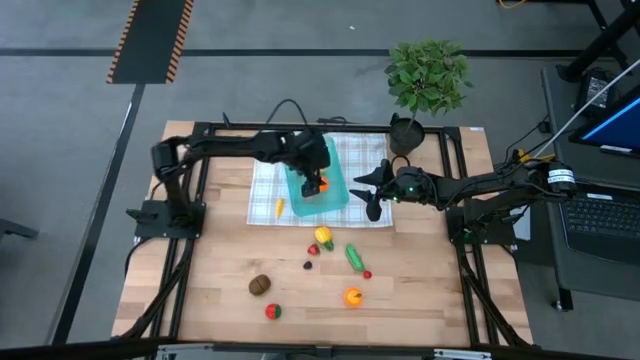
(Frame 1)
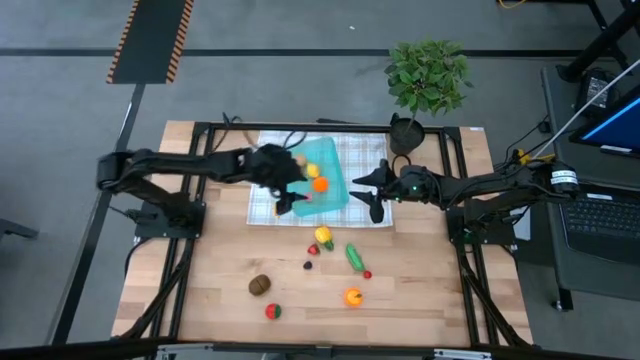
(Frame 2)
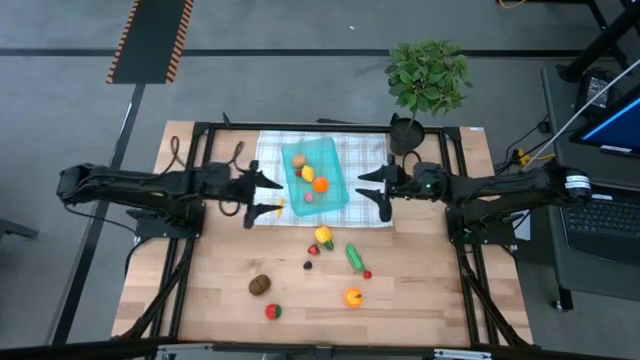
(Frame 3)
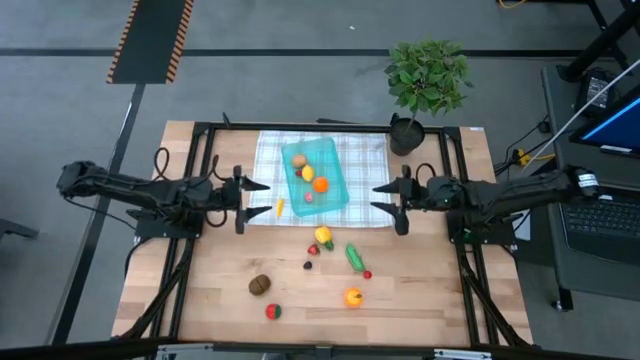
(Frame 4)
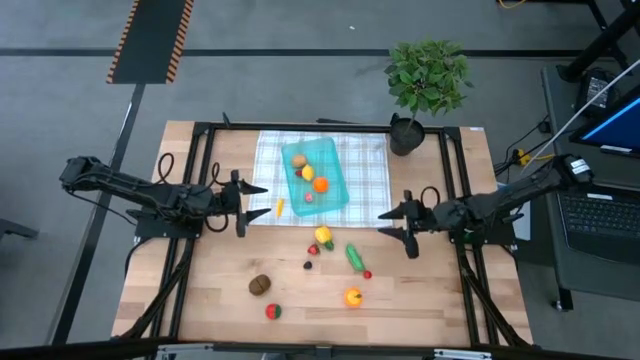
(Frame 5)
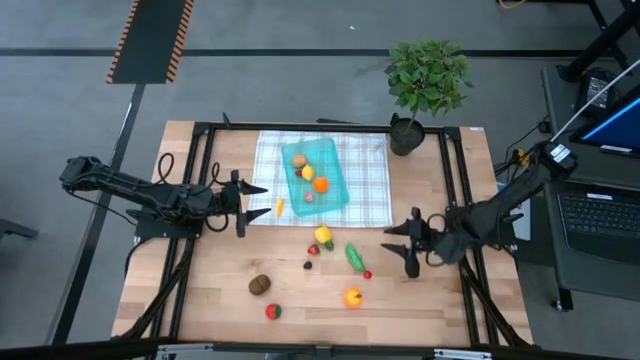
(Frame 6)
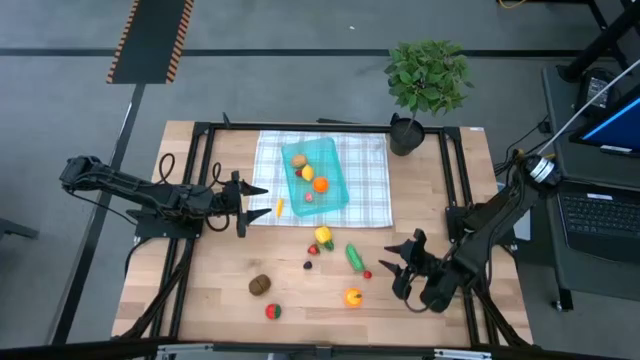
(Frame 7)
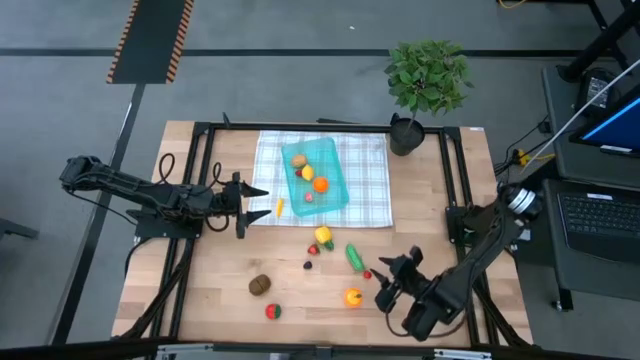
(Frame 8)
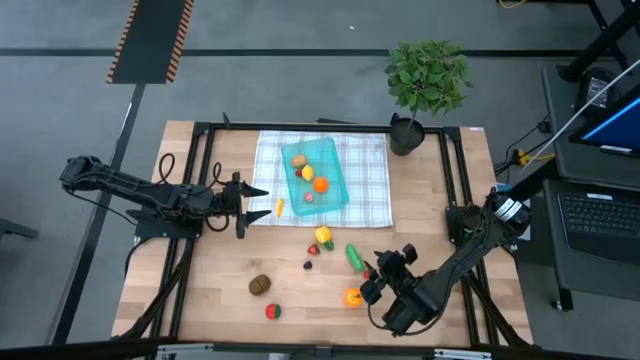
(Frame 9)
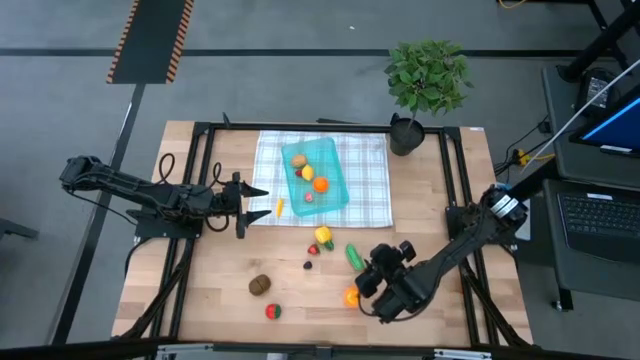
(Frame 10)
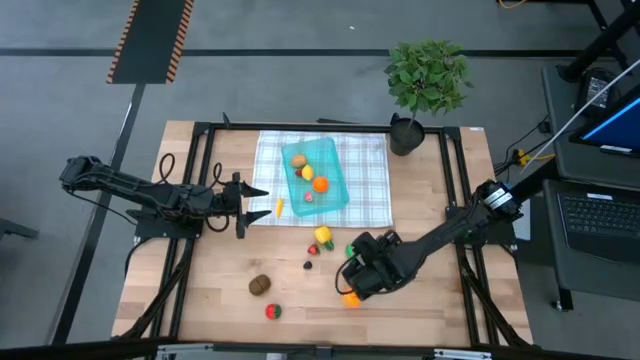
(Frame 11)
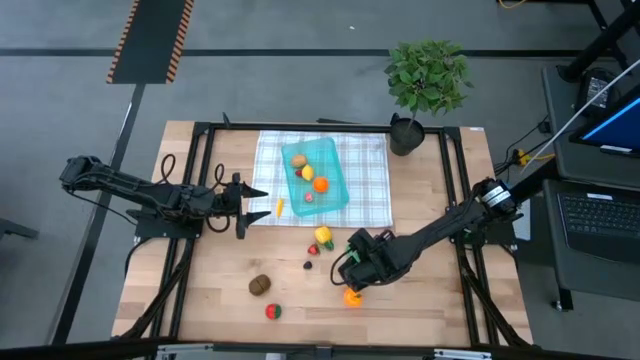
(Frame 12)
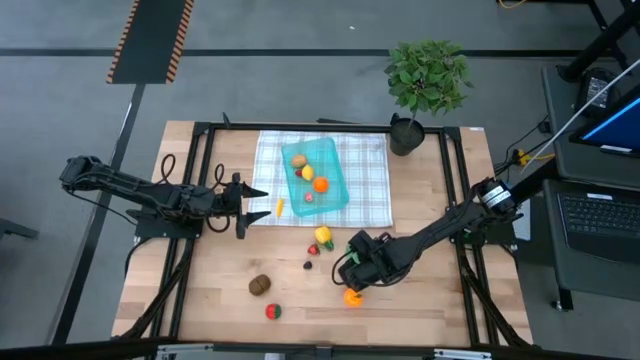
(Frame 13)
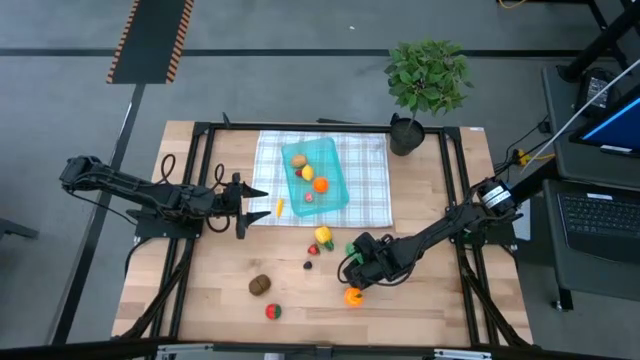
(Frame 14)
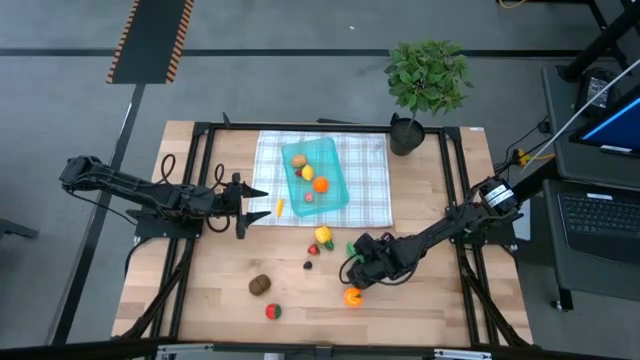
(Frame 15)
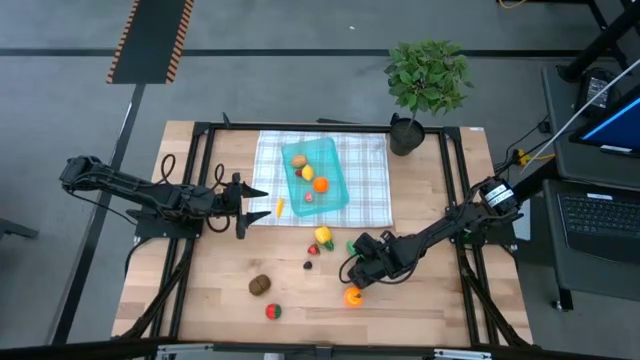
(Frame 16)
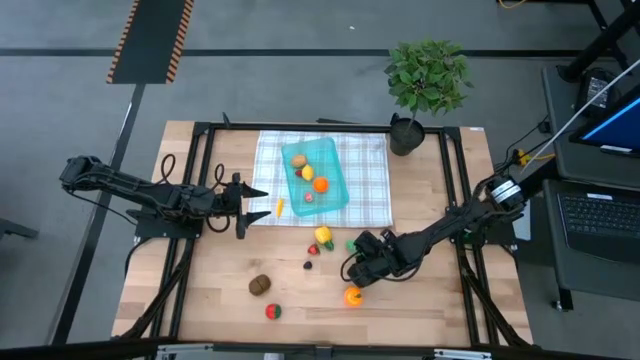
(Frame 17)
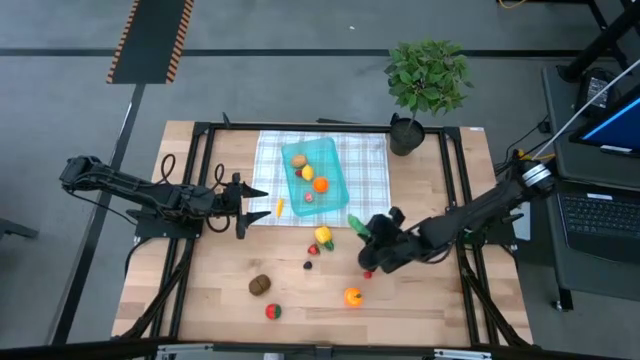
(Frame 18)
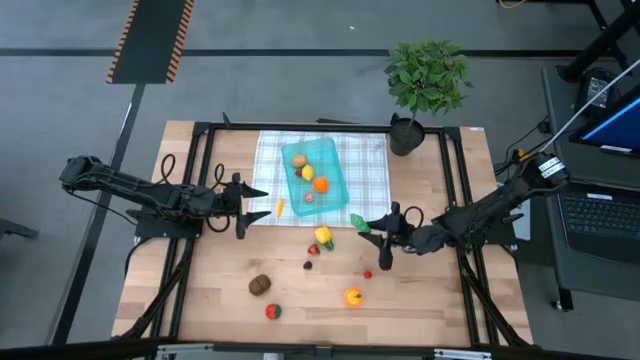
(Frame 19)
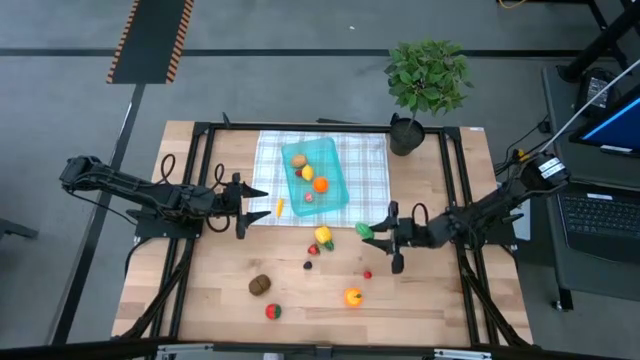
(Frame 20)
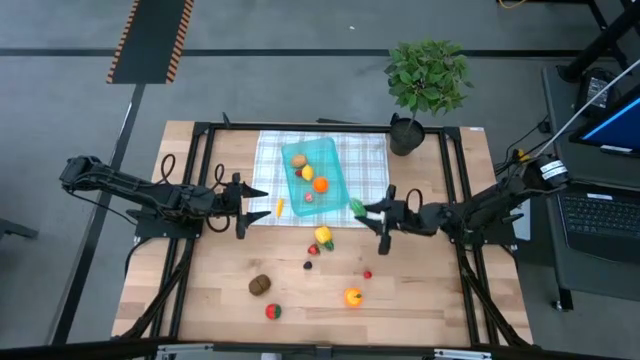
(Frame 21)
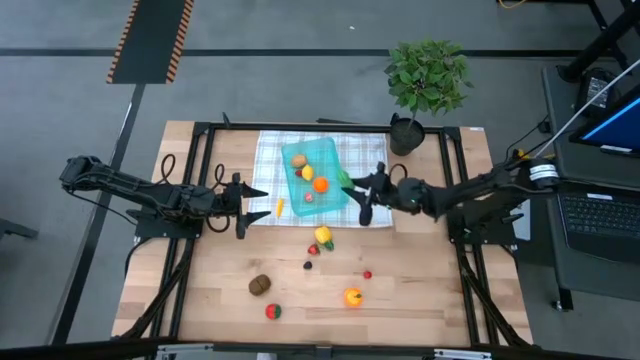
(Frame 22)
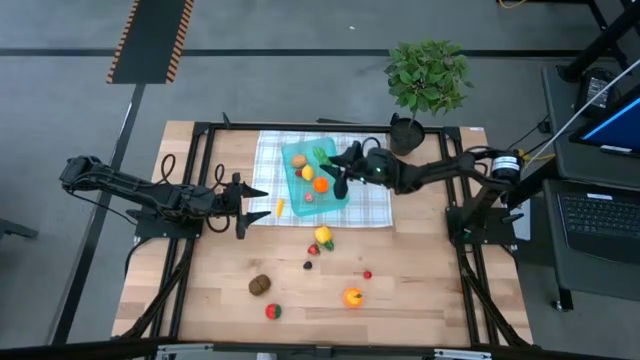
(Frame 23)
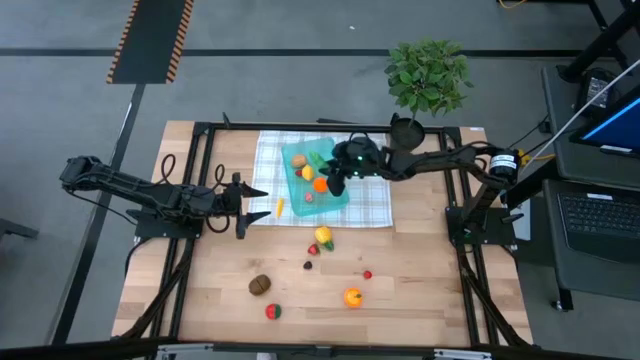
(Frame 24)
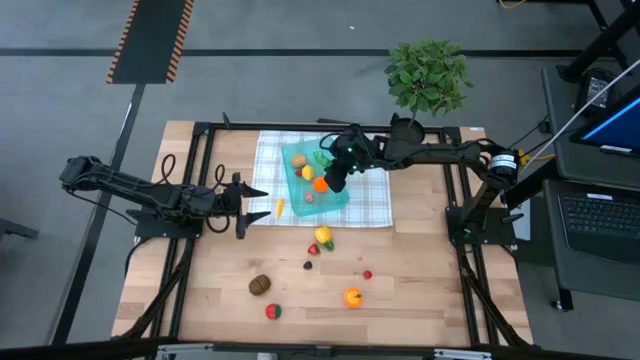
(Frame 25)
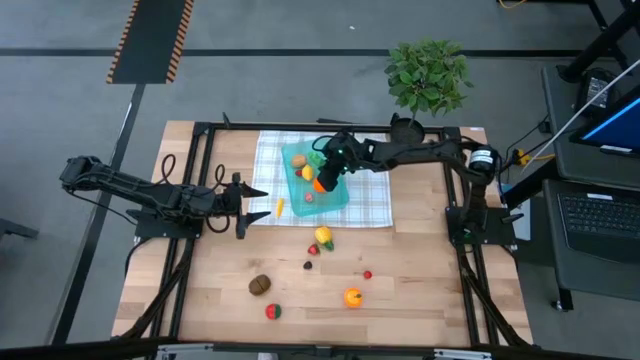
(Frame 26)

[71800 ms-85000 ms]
Task: Pick and placing Produce into tupperware
Put the green pea into the blue bin
